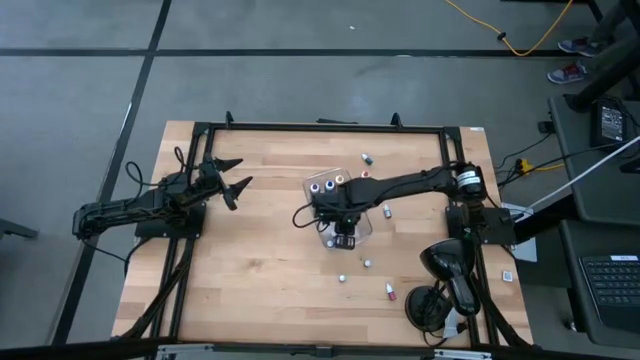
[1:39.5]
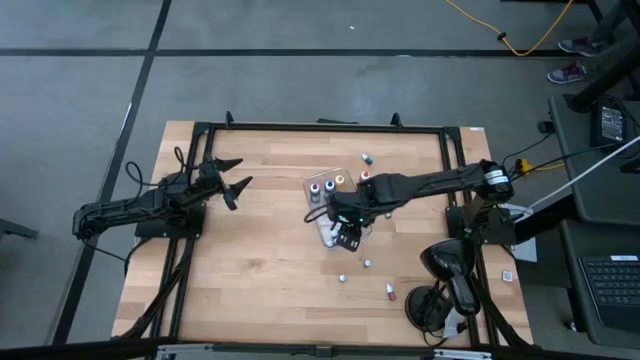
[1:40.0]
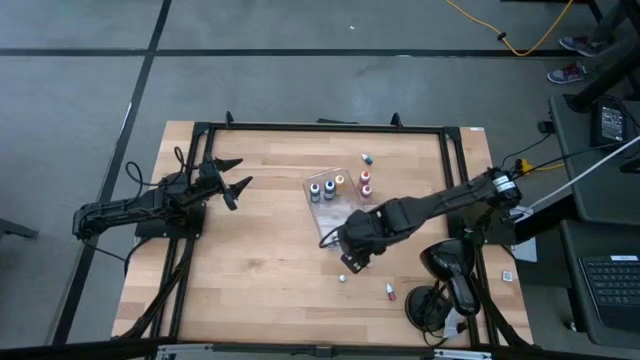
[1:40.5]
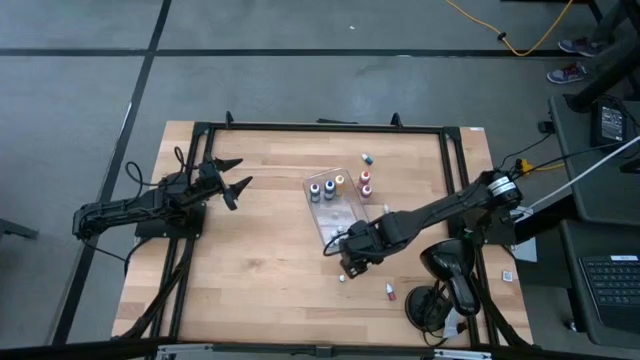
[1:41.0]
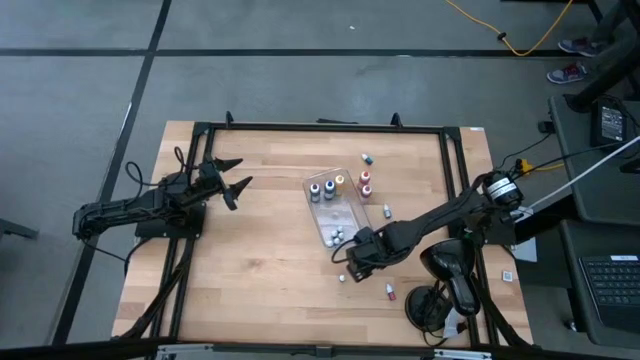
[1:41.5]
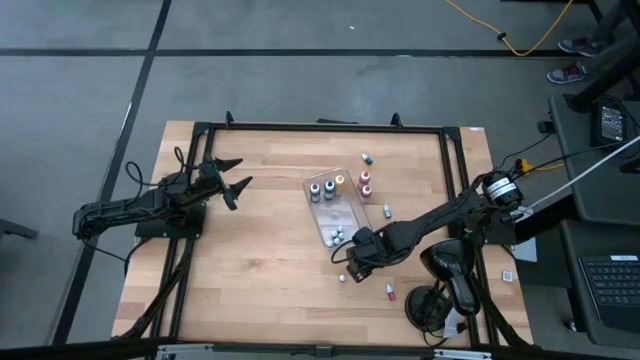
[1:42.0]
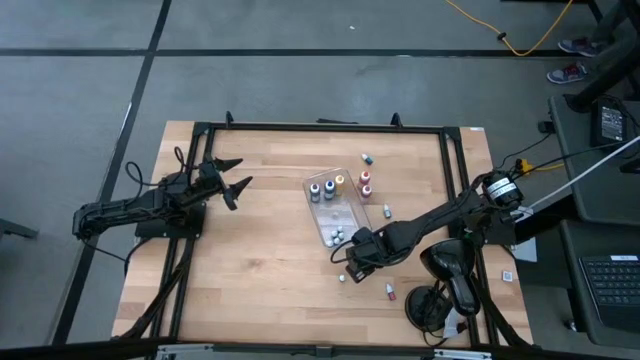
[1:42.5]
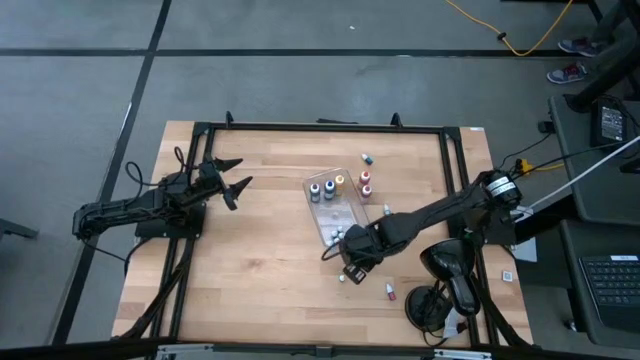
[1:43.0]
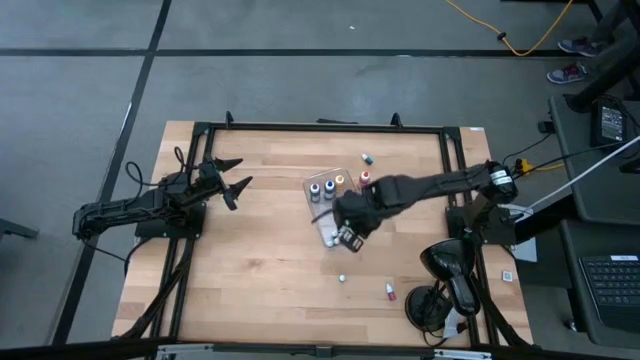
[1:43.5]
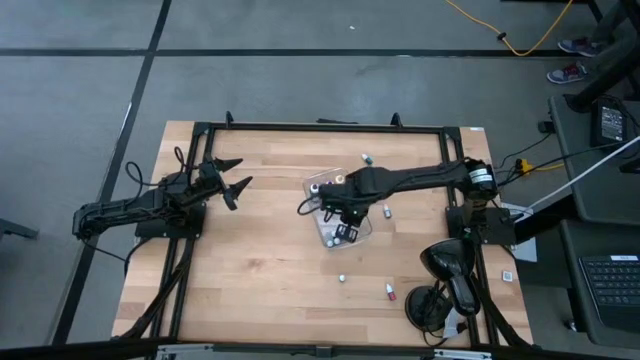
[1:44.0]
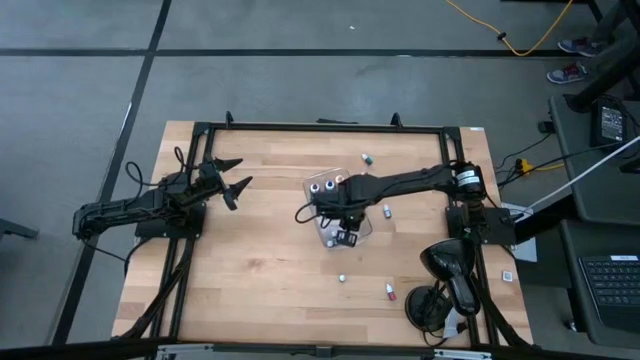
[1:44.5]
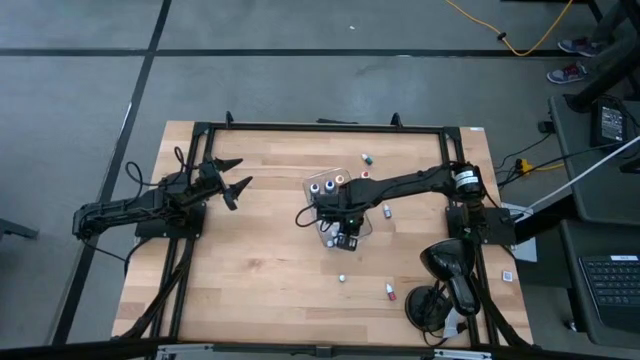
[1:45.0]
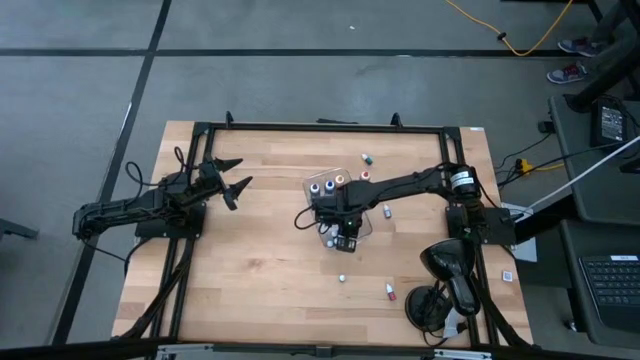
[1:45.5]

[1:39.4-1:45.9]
Task: Pick & Place food coloring
Put the right small black food coloring bottle into the bottom of the bin

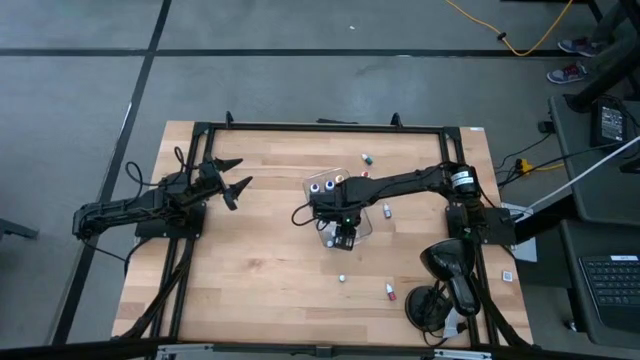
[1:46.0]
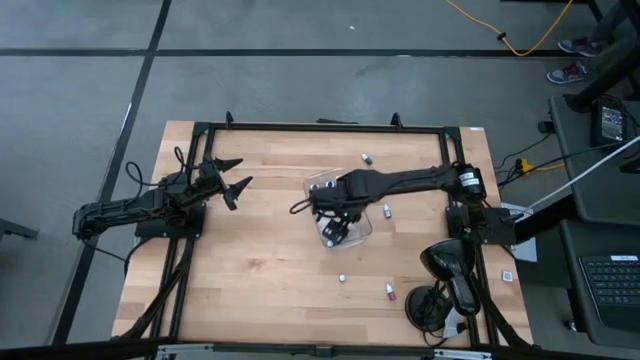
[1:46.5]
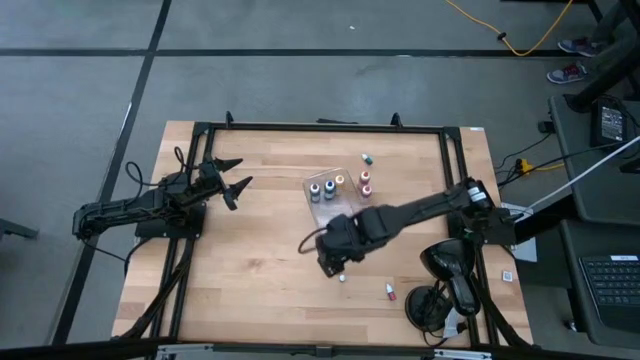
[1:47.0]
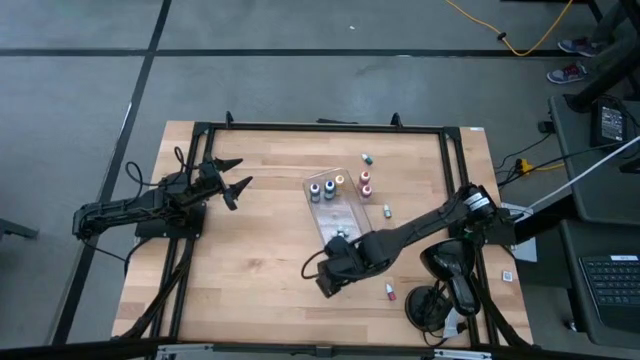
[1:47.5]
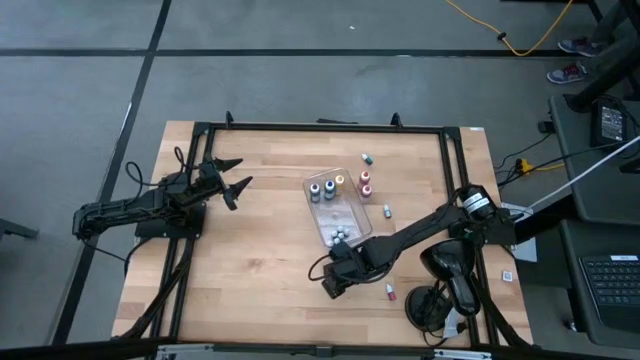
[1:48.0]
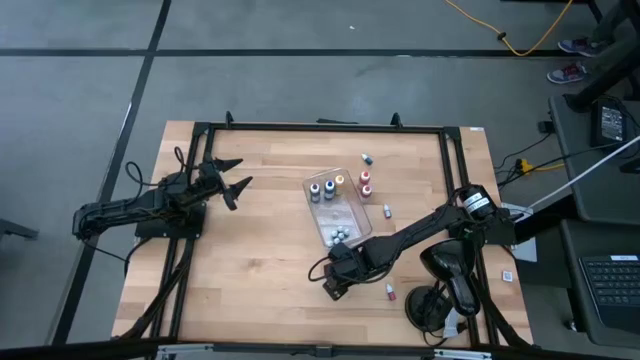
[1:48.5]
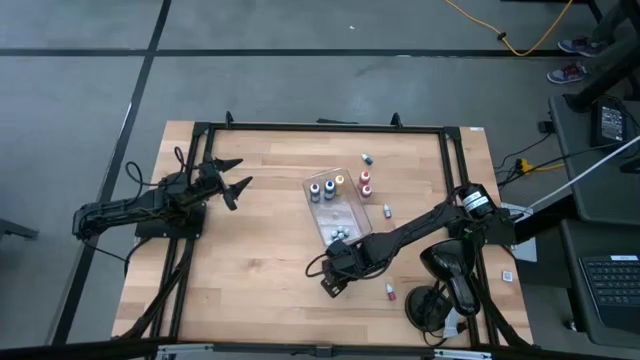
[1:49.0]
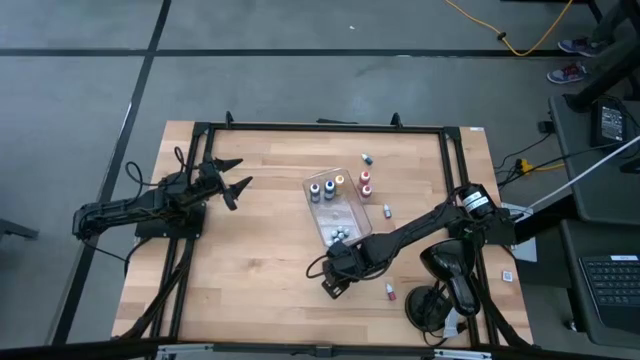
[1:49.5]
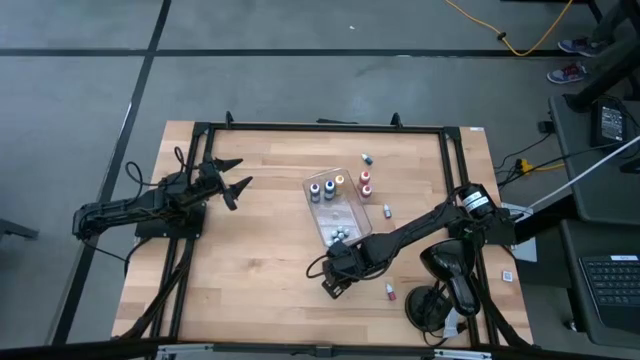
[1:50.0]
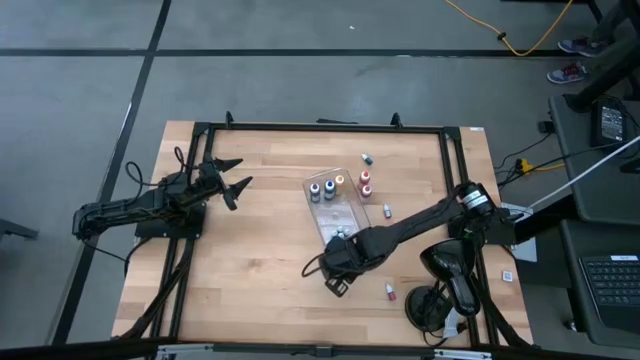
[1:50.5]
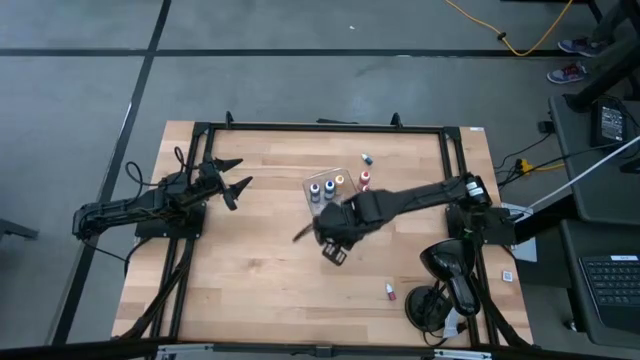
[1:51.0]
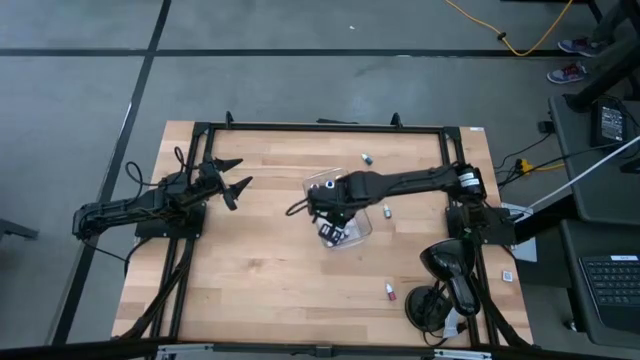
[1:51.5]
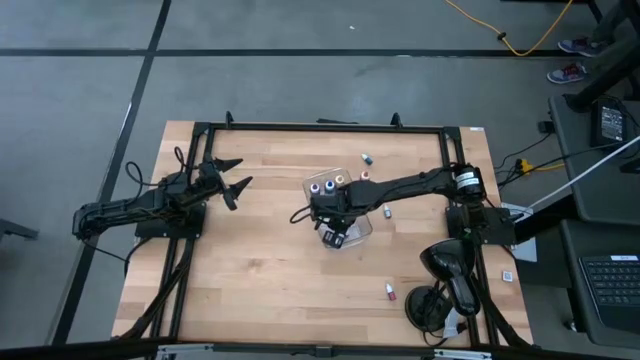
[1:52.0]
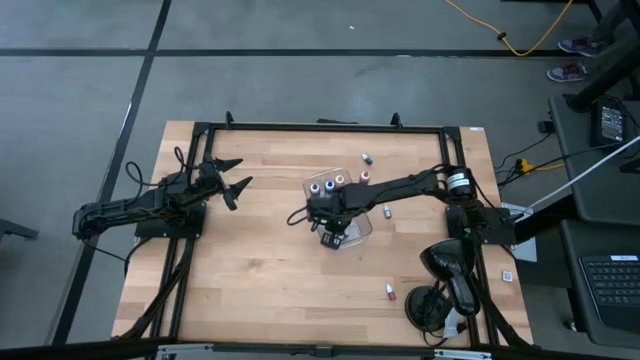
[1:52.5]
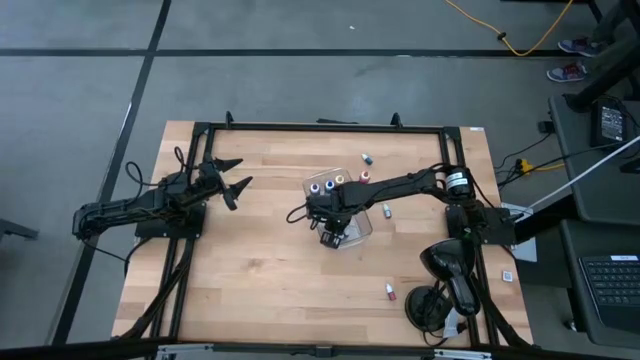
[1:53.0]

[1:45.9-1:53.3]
Put the small black food coloring bottle into the bottom of the bin

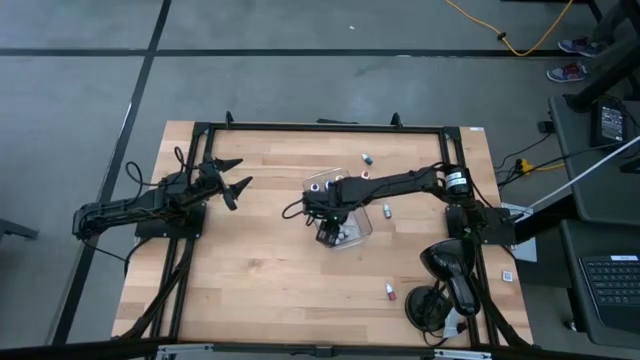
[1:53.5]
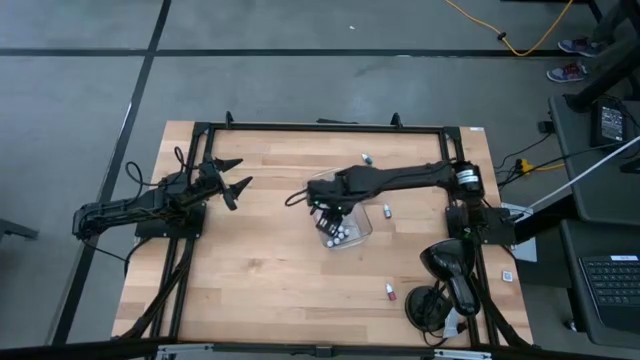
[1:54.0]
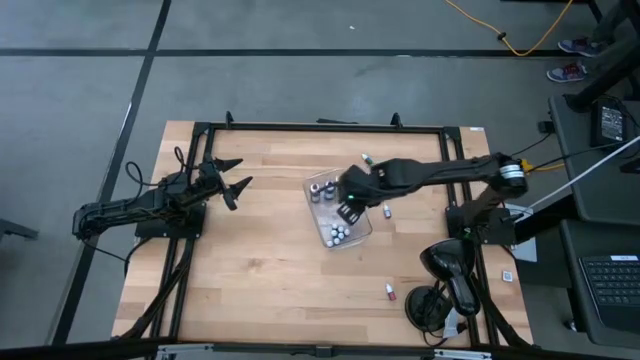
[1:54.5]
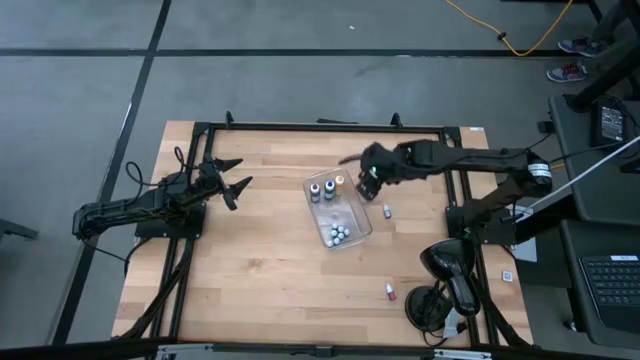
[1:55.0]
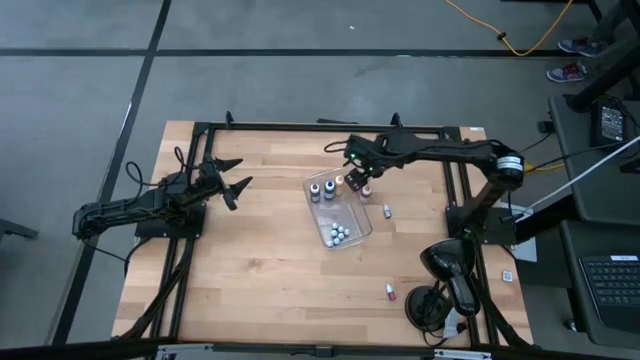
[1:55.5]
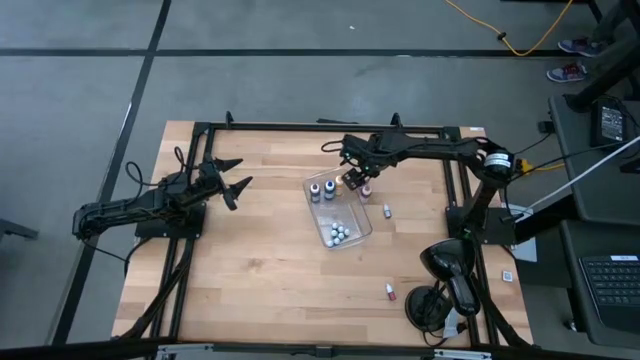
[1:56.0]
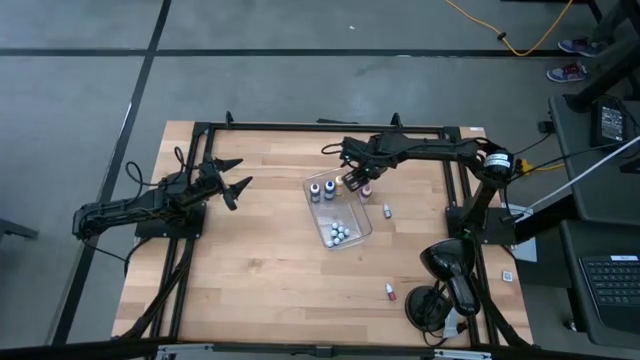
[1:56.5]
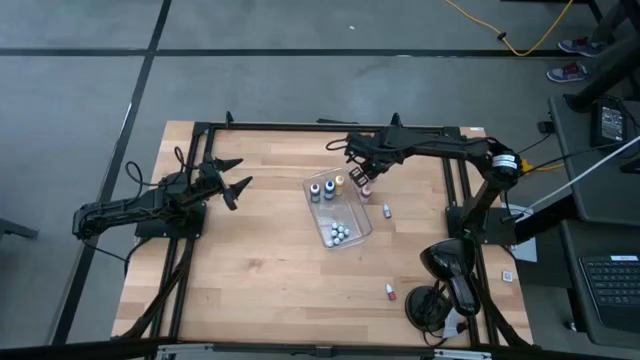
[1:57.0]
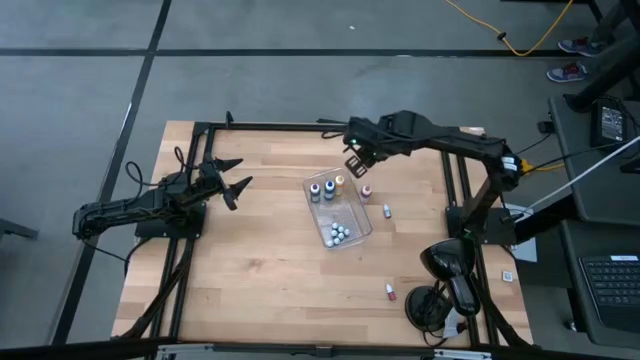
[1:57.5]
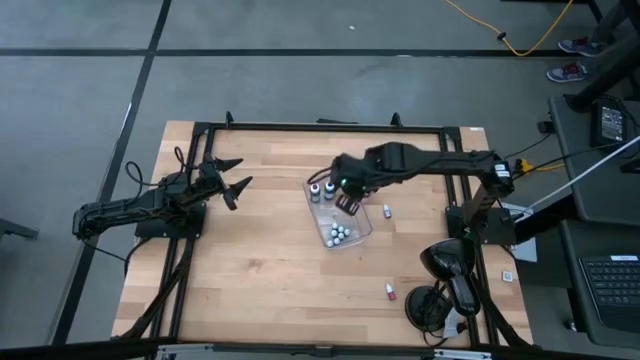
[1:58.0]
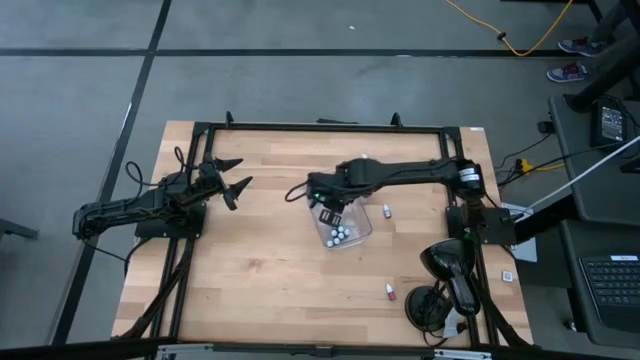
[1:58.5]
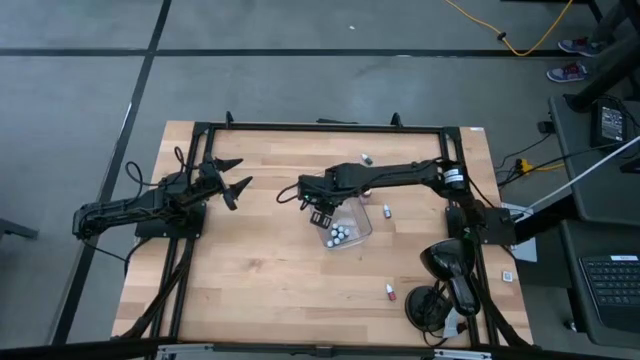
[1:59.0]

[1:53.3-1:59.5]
Put the large orange food coloring bottle into the top of the bin

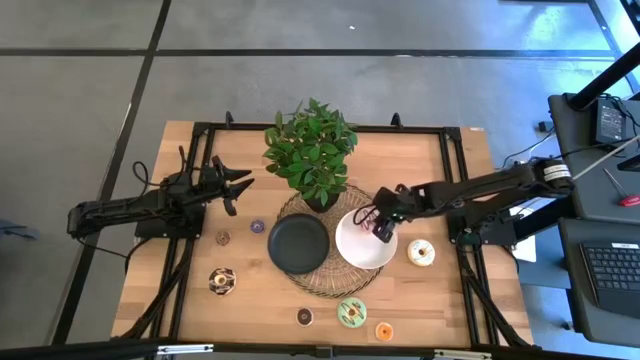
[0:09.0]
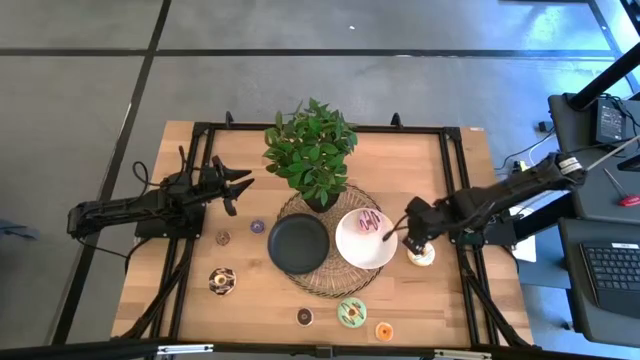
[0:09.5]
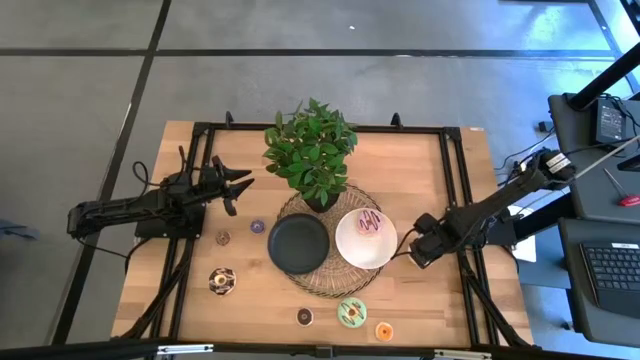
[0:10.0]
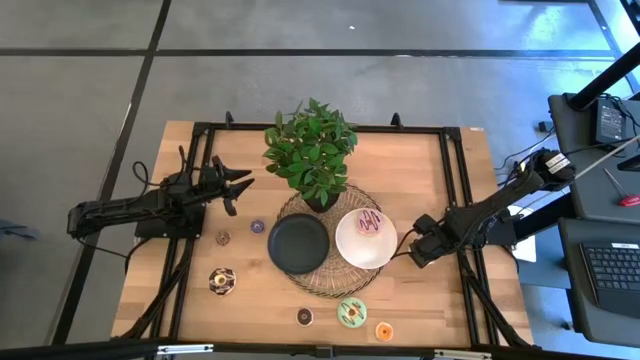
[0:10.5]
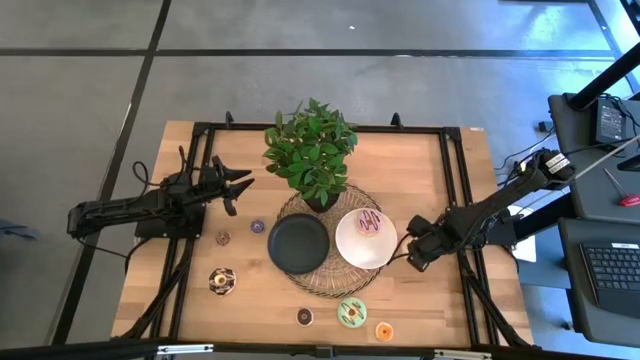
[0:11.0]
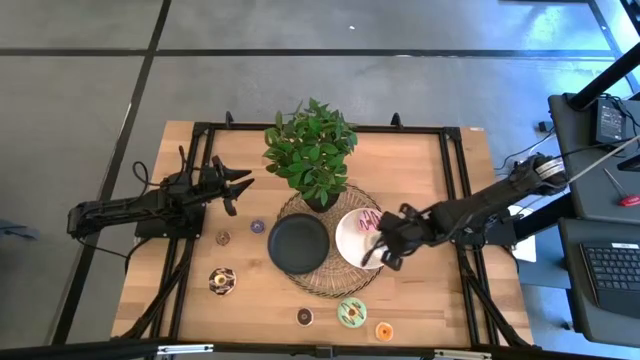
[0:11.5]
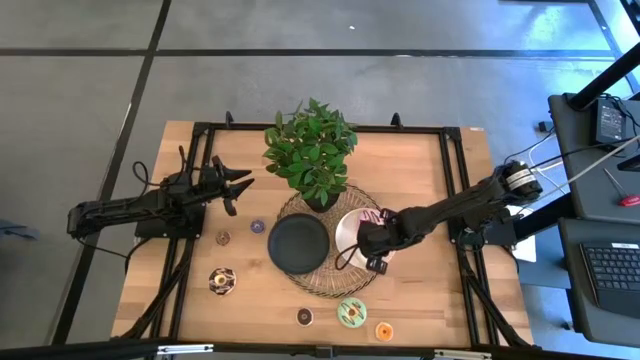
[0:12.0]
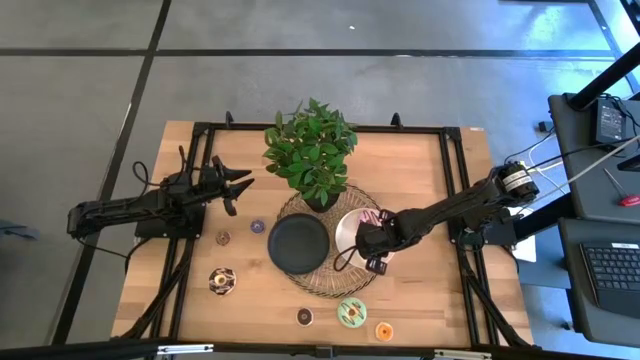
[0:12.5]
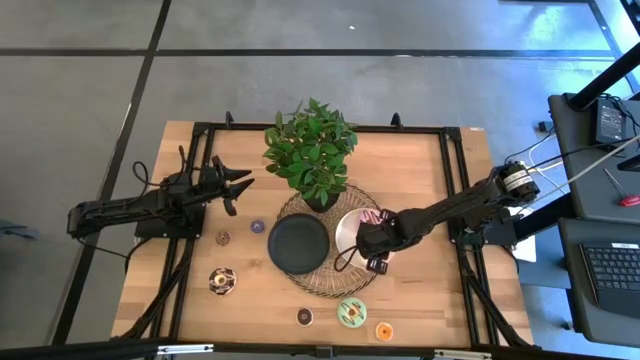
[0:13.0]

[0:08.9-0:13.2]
Task: Pick & Place donuts
Put the large white donut on the white plate
